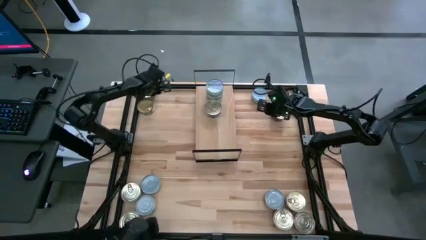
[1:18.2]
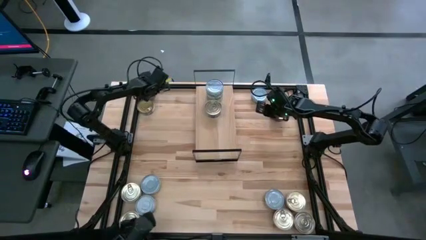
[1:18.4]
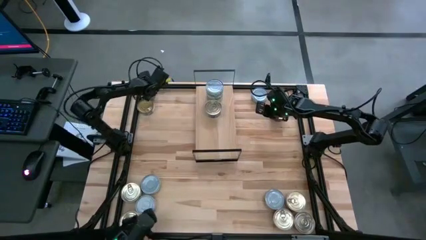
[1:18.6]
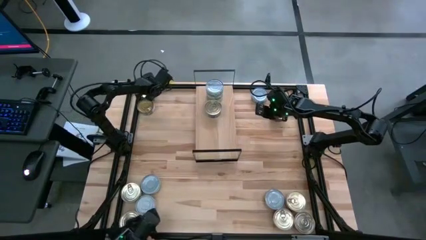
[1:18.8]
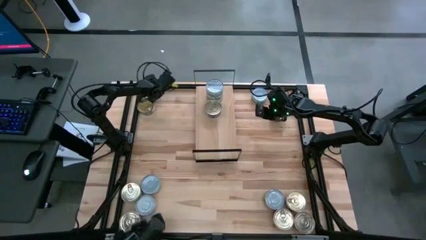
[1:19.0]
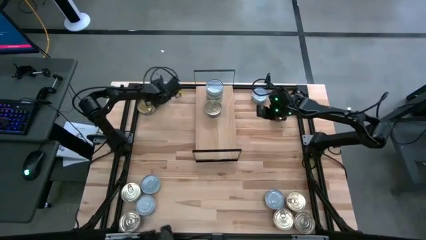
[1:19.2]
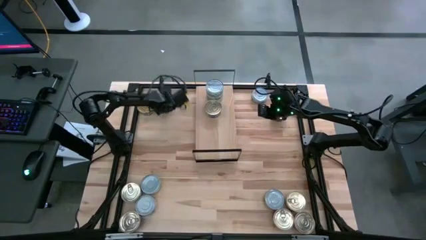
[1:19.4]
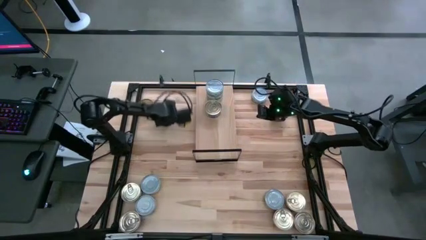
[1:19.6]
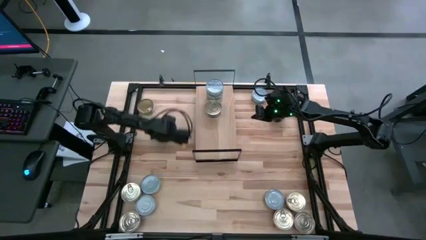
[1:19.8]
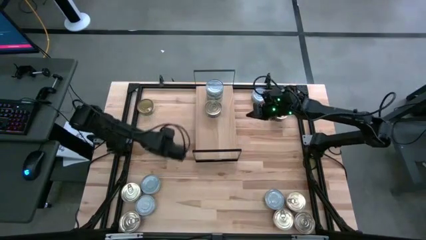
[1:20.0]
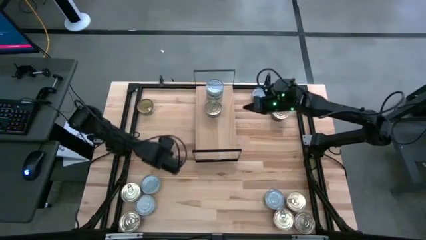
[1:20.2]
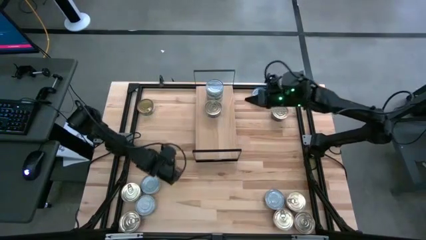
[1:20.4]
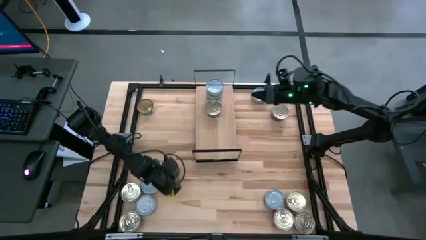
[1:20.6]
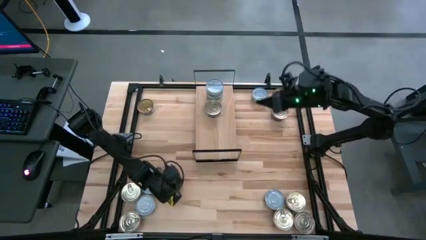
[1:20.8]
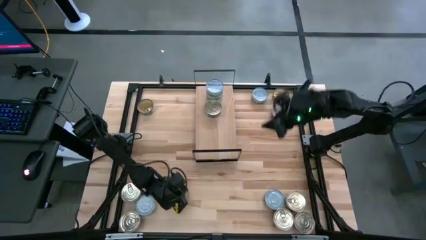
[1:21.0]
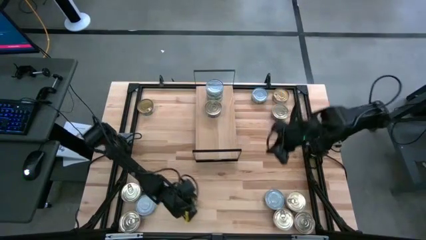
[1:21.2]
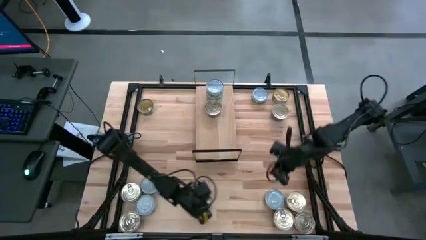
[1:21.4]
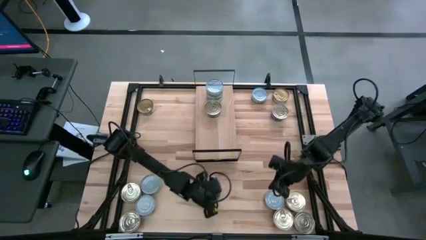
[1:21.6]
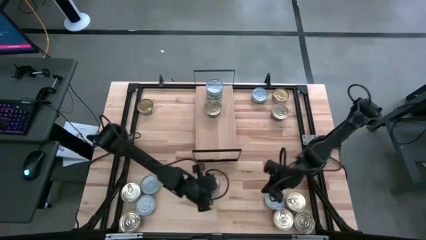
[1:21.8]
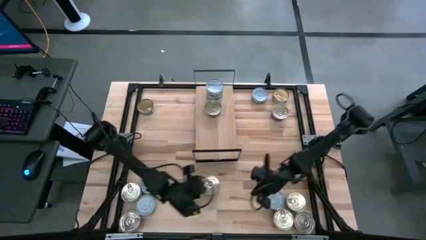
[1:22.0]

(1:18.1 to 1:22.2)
Task: Stack canned seafood by type on shelf
Move the pink and blue tuna can to the bottom middle of the table

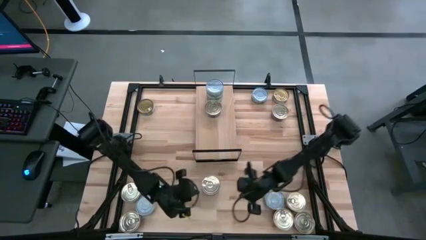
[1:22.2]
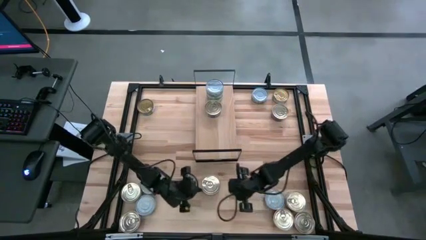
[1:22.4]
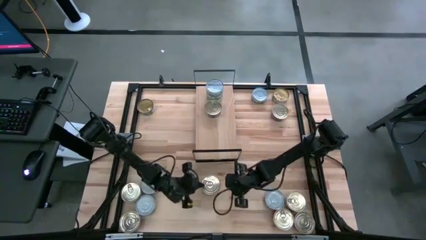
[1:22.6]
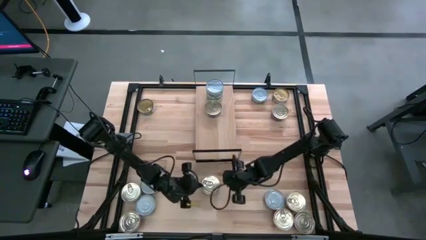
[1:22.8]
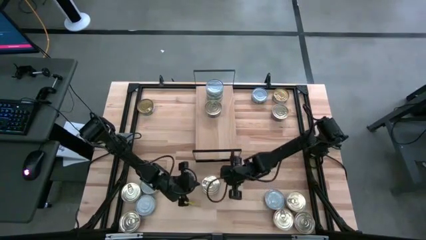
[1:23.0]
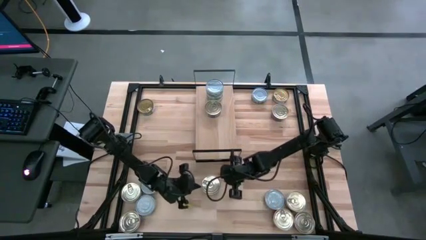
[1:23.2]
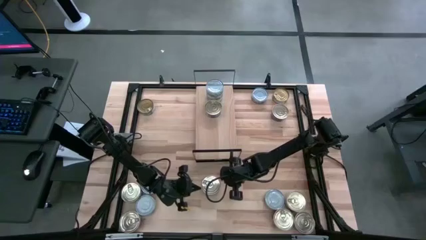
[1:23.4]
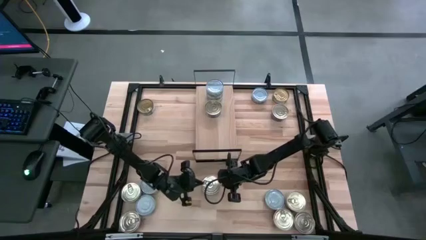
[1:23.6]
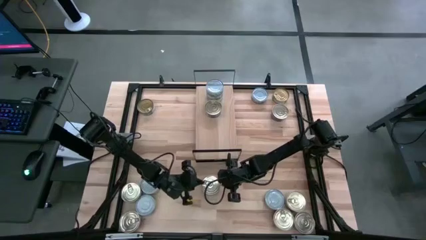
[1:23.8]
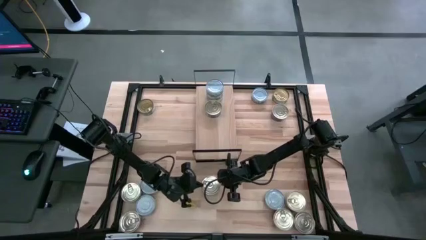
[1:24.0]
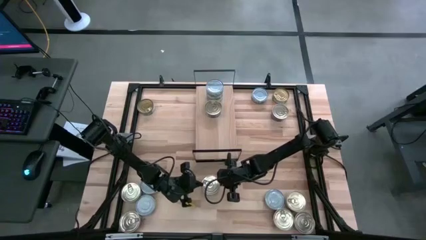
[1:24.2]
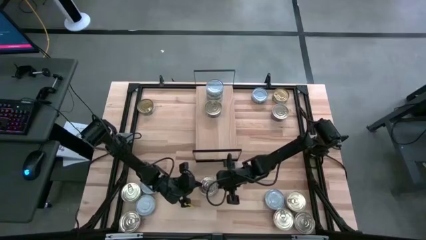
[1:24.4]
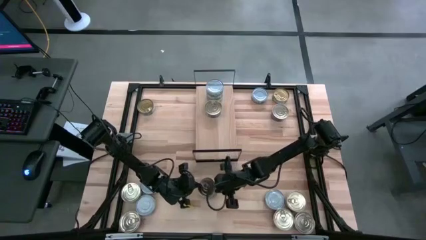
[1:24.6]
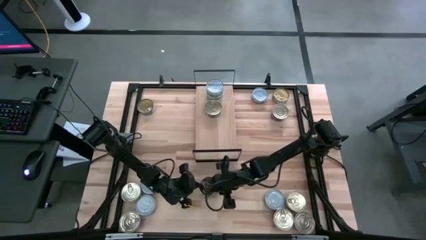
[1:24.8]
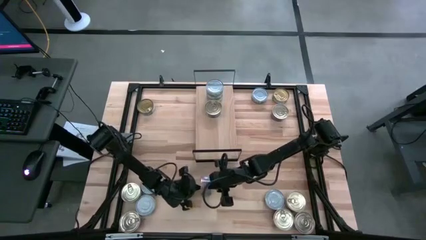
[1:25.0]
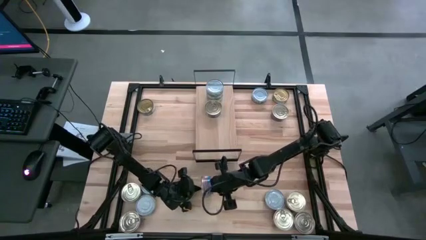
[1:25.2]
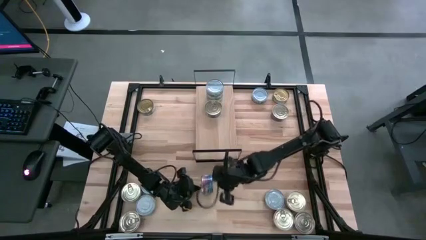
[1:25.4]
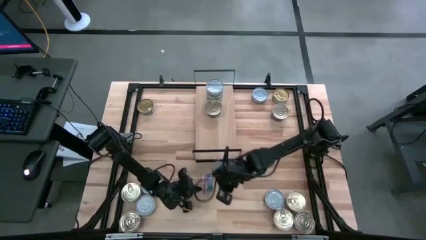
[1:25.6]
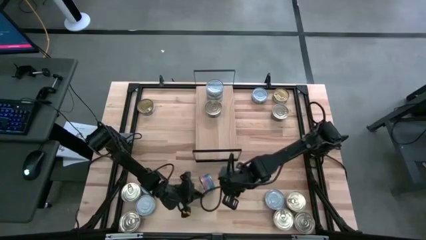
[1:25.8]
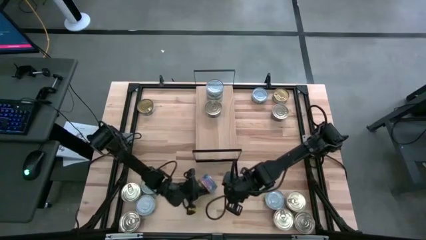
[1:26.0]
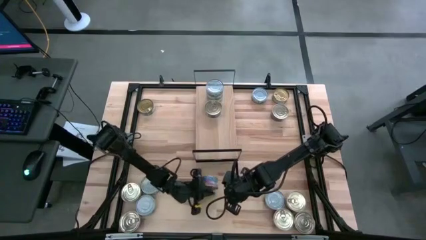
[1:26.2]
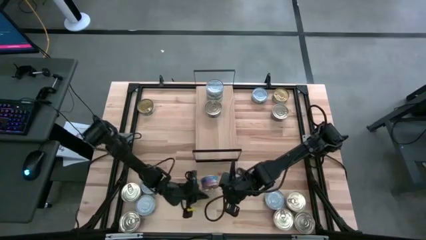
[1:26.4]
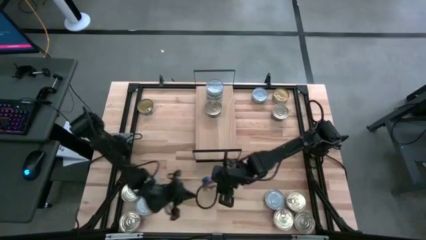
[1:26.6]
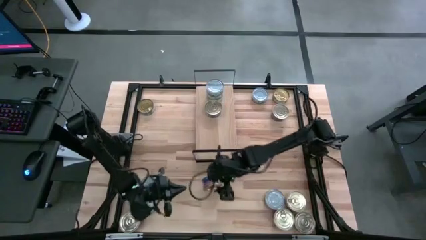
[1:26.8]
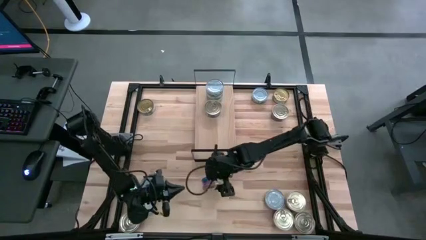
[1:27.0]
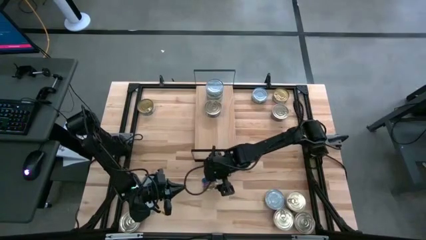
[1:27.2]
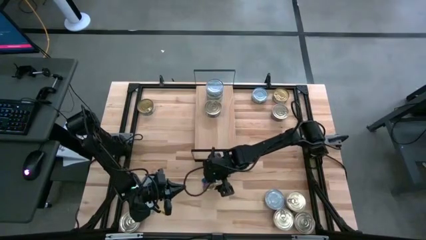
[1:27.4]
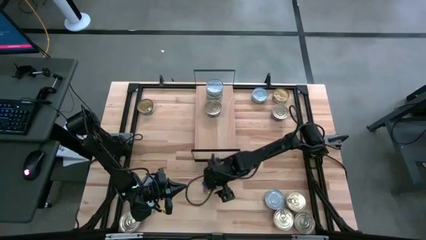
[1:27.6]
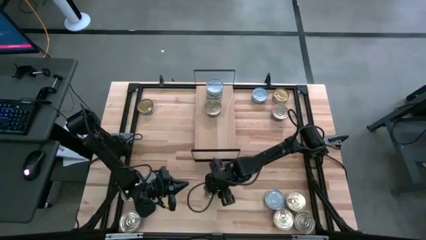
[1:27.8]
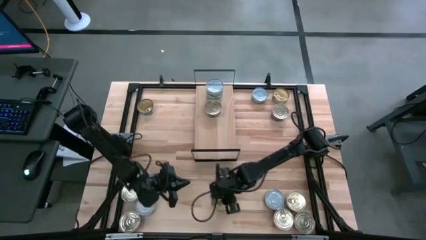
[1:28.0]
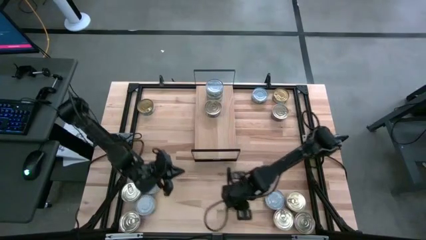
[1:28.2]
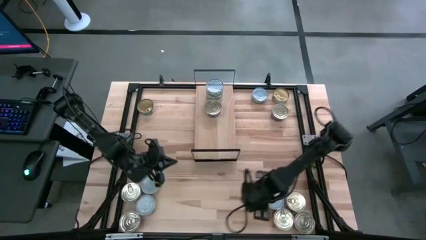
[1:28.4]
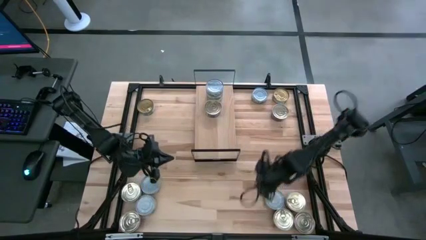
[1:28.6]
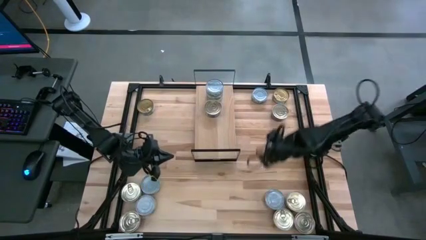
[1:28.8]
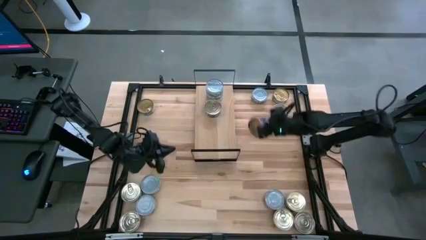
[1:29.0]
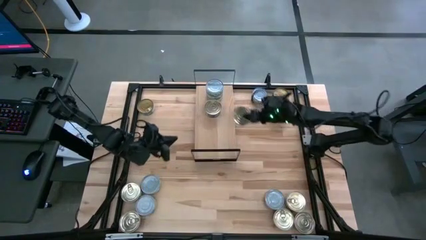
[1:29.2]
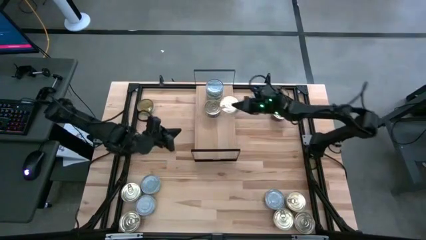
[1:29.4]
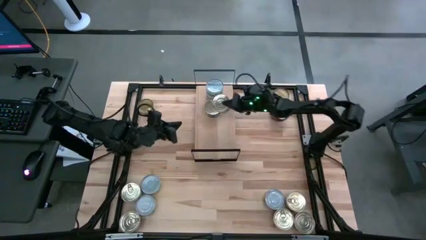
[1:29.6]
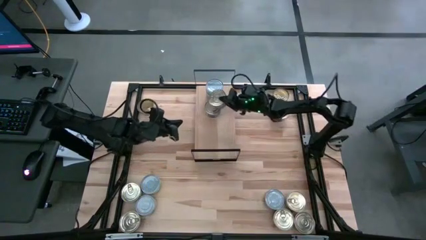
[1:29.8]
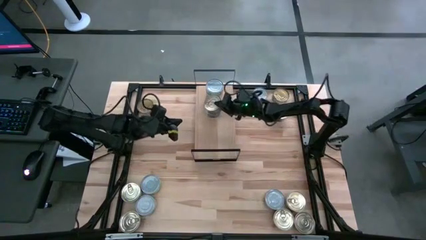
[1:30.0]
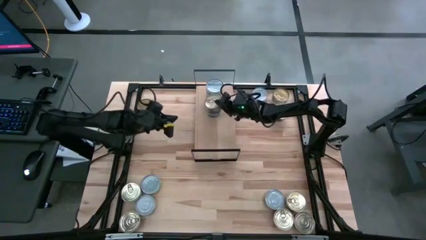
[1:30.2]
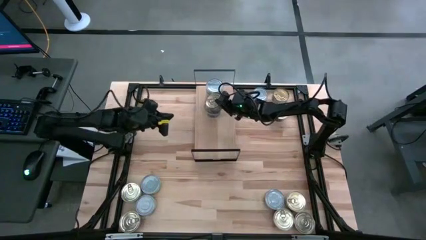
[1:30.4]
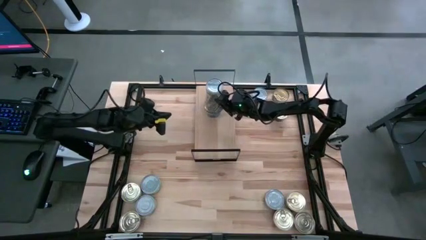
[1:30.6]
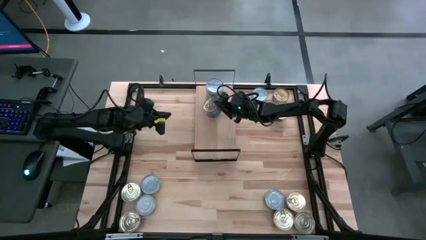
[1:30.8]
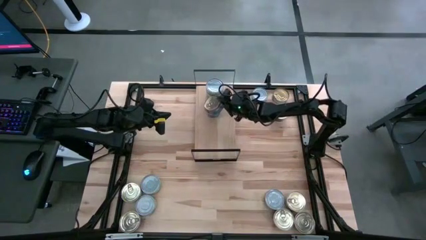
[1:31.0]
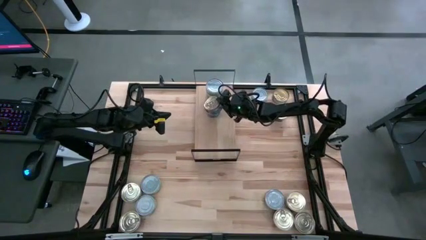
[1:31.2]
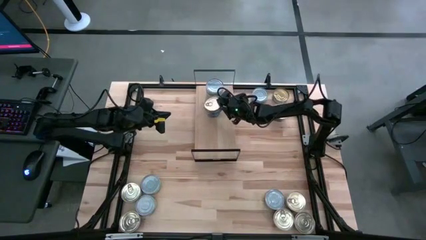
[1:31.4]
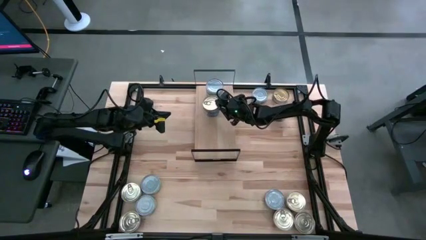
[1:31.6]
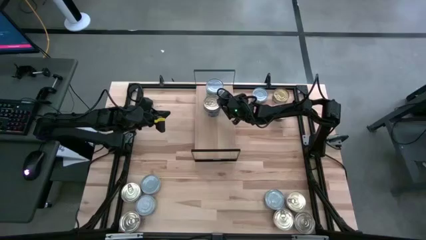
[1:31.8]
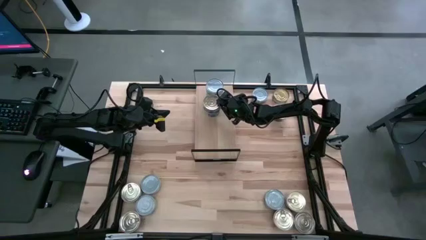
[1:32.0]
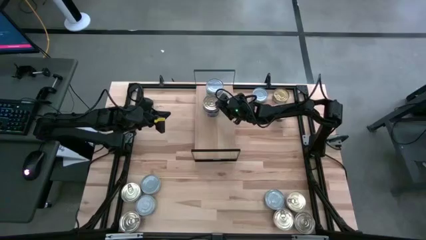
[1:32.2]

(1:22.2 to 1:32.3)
Stack the pink and blue tuna can on top of the pink and blue tuna can on the shelf

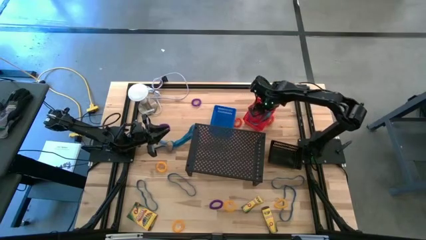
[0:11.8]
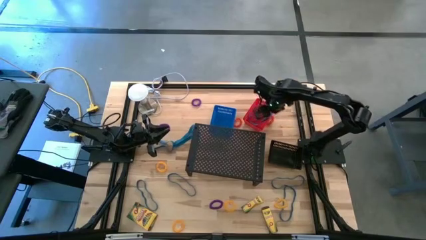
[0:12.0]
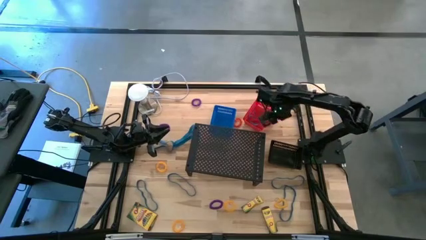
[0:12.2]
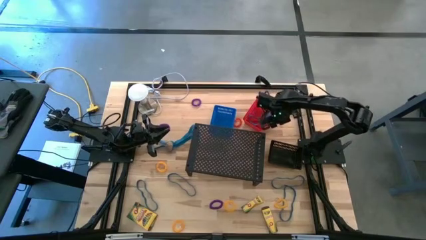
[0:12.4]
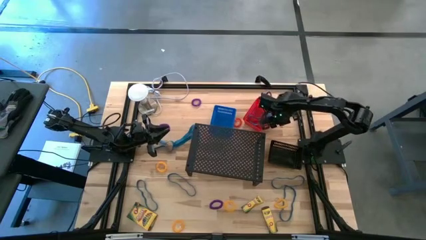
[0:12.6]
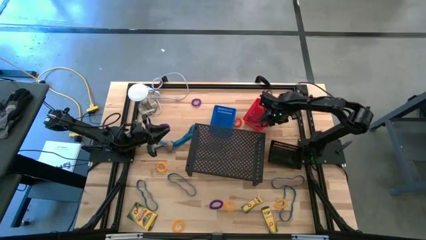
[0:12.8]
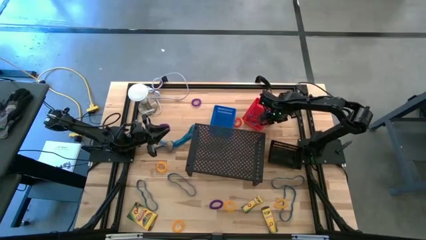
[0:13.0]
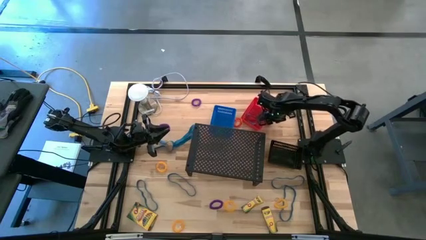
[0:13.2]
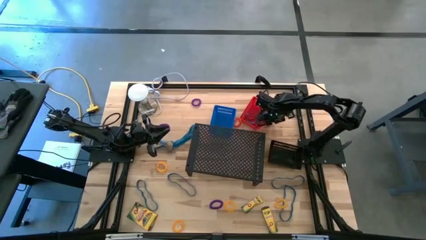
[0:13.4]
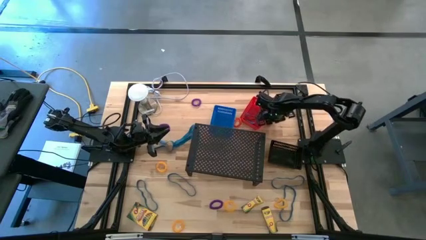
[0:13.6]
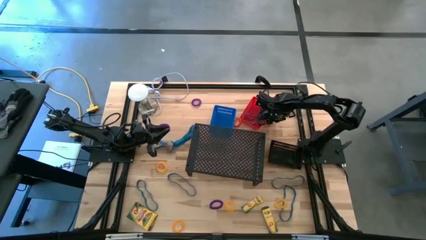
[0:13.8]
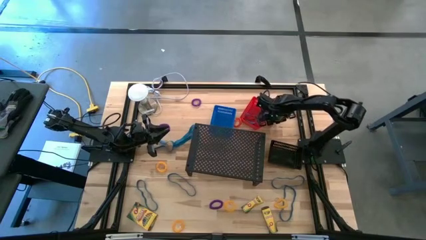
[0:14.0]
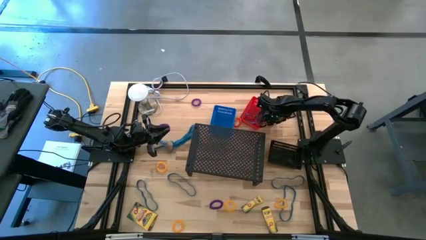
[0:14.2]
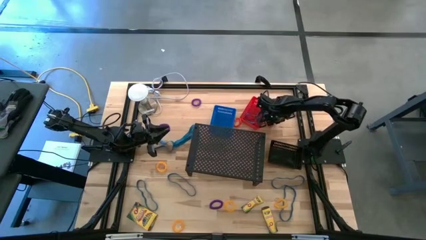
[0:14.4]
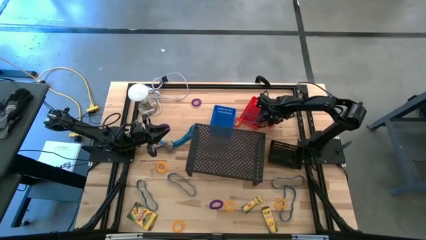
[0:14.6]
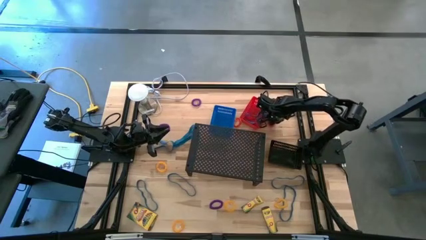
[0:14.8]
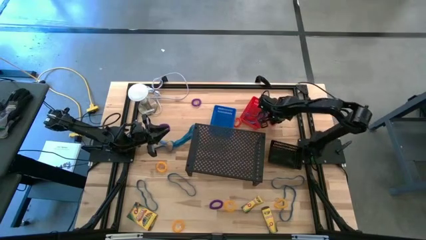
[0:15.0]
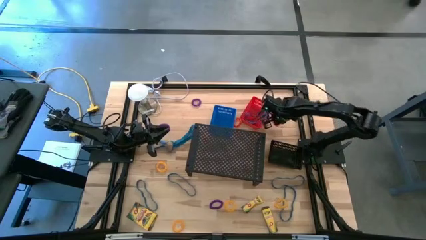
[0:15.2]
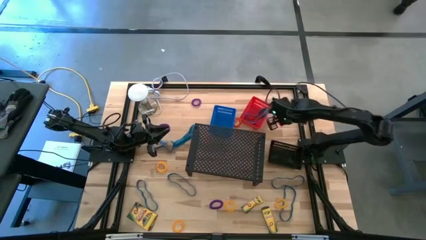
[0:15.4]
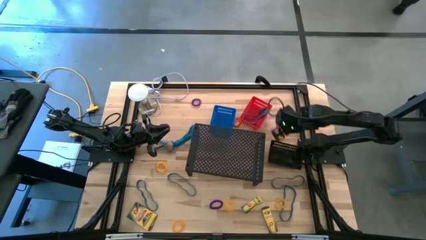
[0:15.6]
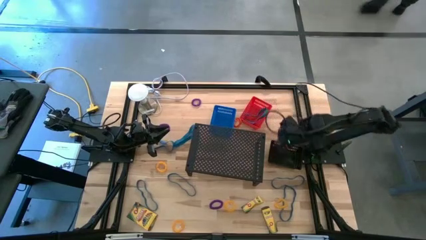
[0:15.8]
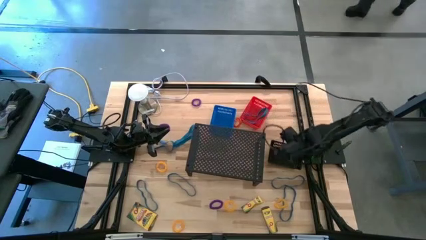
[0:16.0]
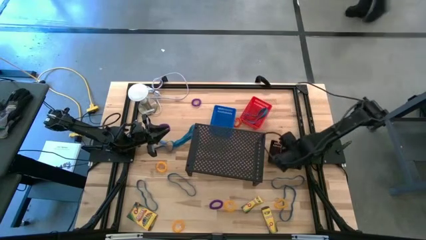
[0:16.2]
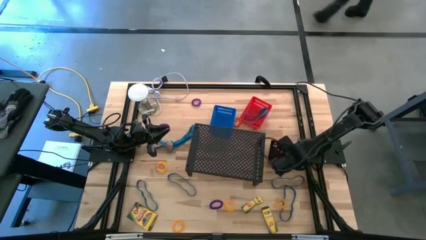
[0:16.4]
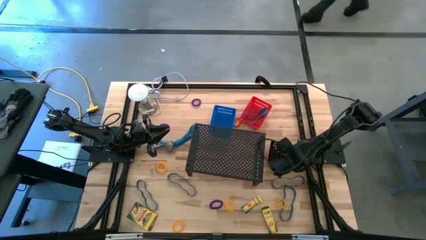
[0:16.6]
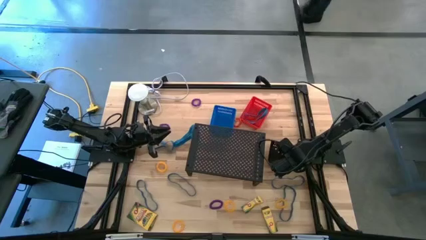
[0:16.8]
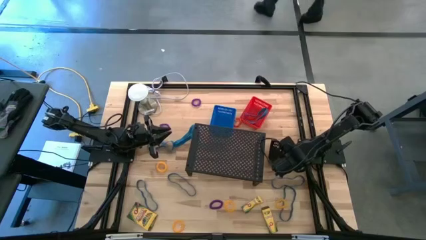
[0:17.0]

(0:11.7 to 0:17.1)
Task: Pick & Place Office Desk Supplies
Put the orange spiral keychain into the black bin
